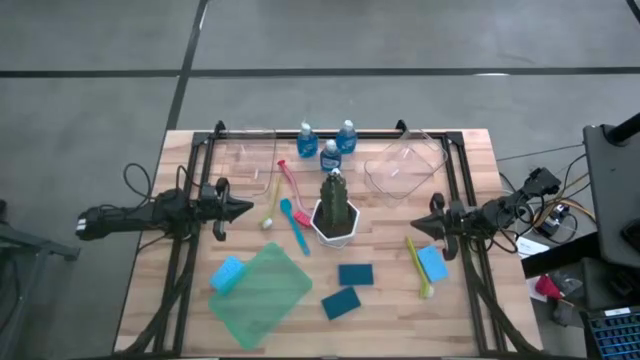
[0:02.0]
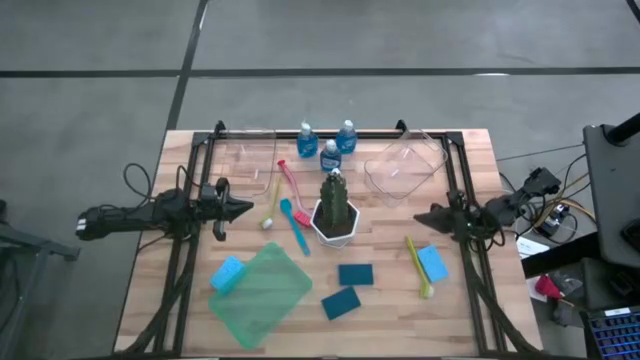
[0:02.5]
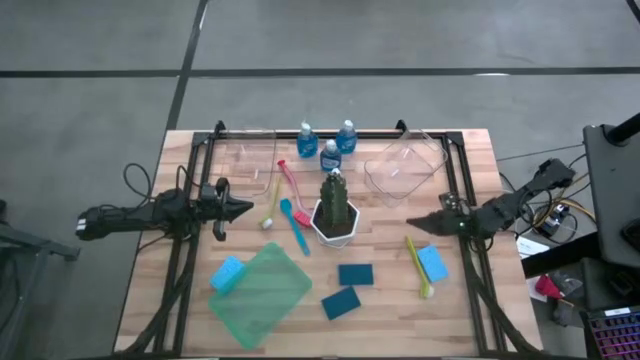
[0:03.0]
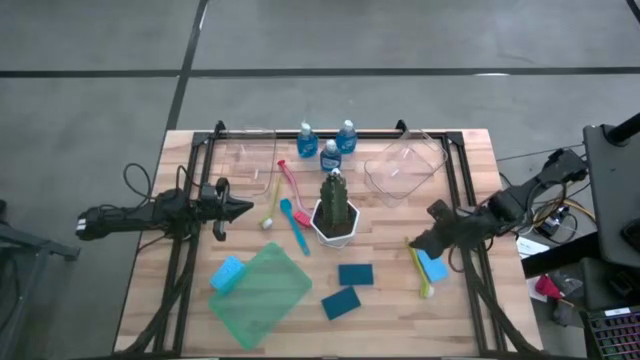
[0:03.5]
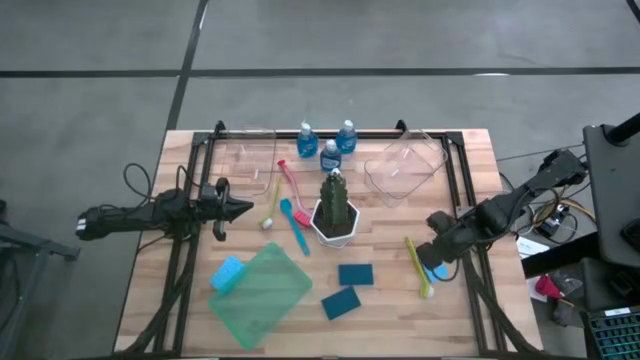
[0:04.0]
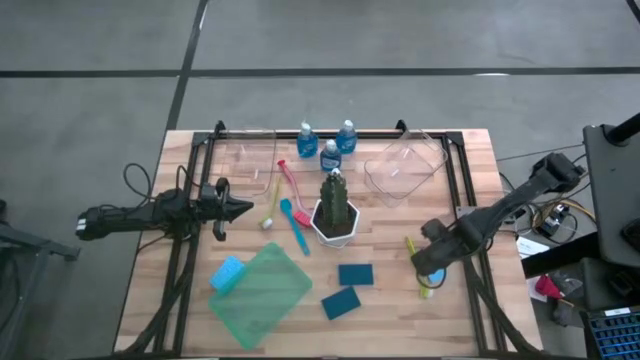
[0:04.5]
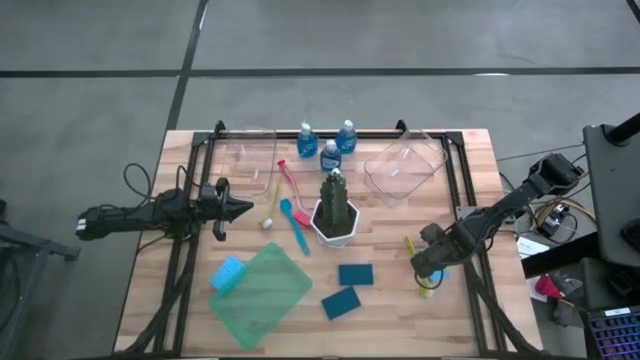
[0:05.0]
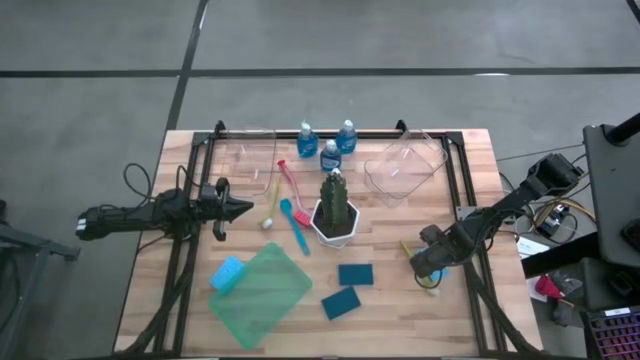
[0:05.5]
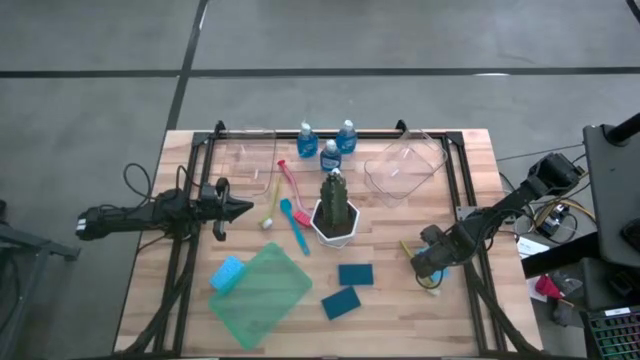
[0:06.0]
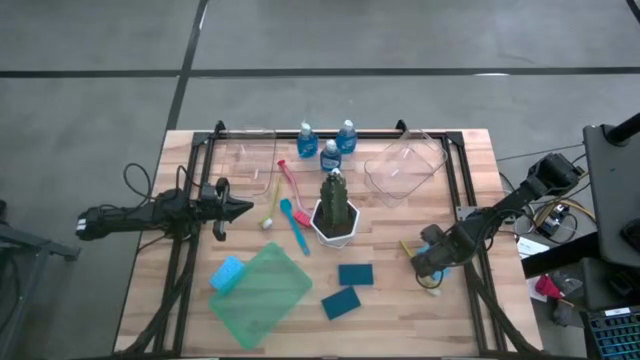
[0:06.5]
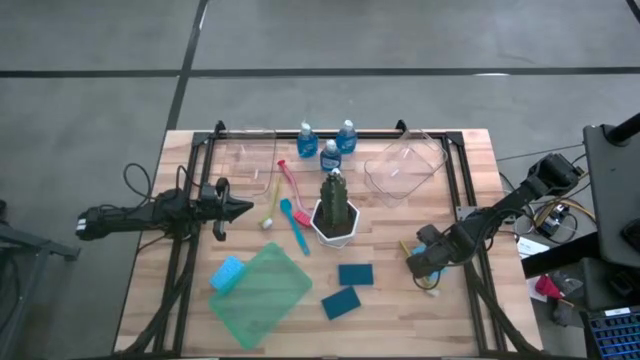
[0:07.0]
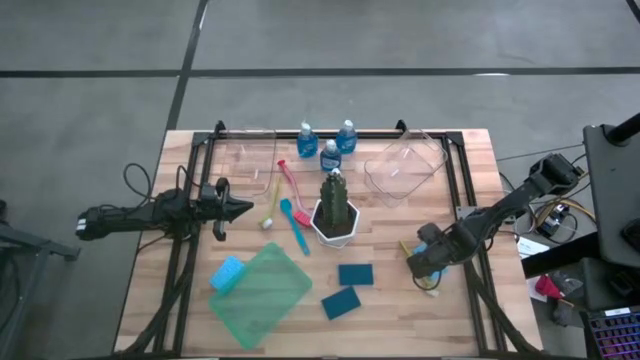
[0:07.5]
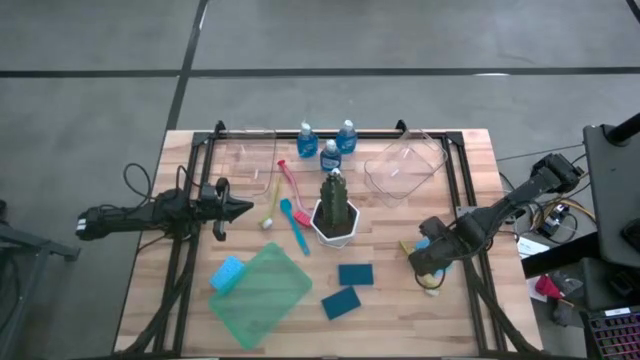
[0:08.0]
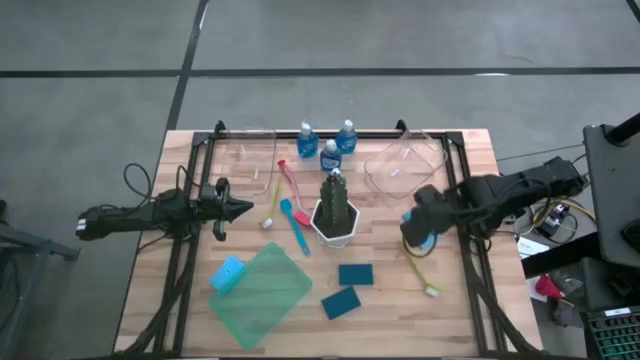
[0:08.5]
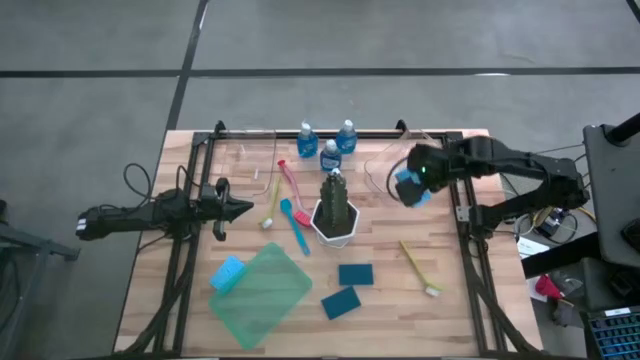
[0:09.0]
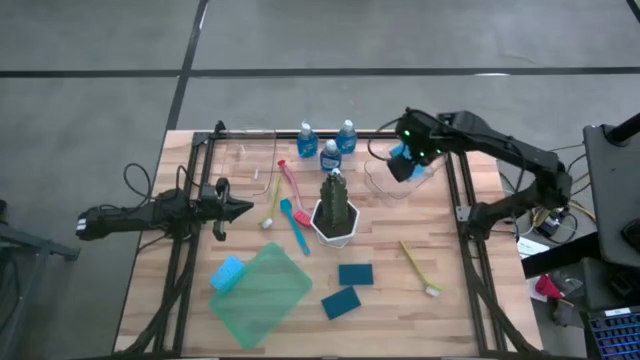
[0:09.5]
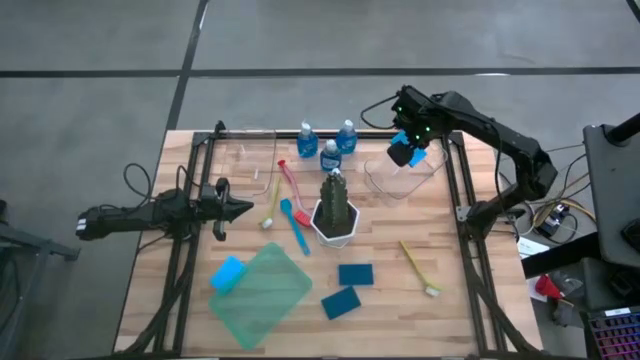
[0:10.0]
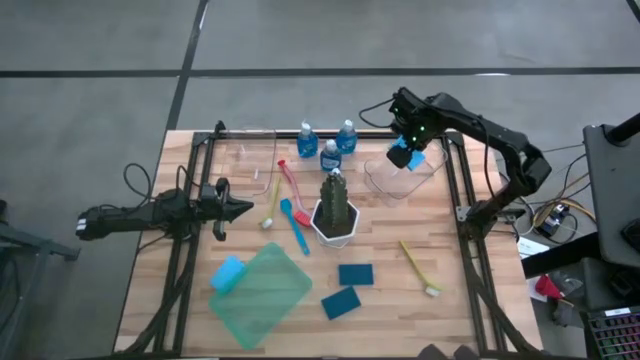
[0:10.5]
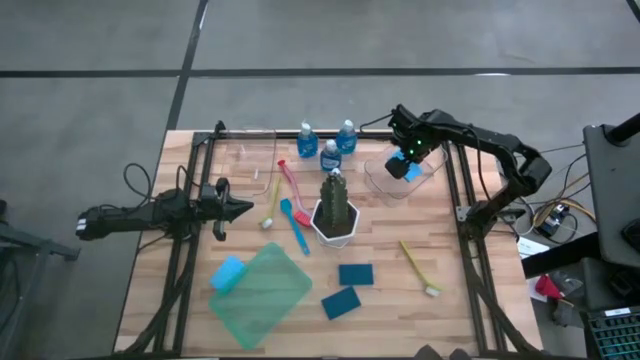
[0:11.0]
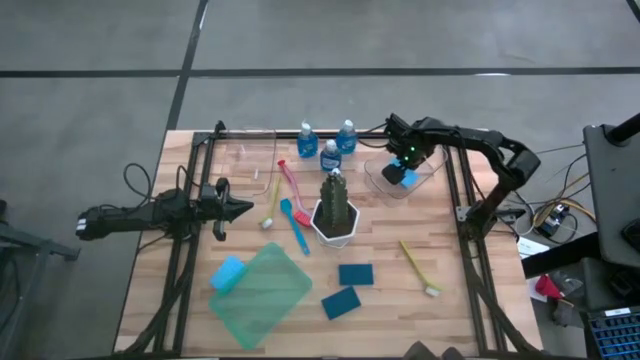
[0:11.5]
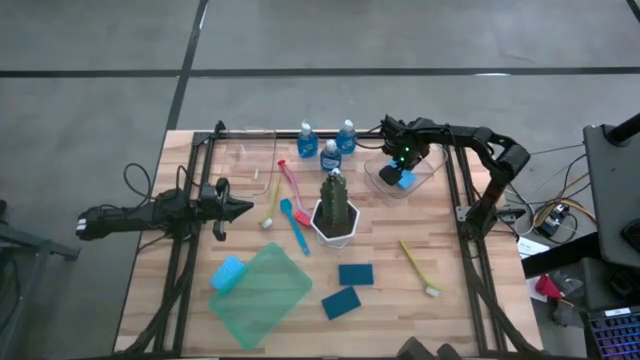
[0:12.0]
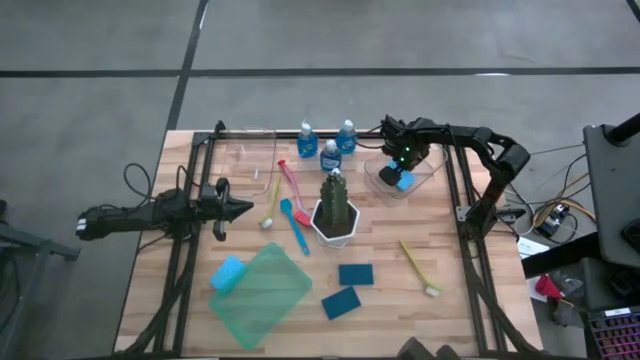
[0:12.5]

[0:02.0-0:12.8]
Task: Pick & Place Kitchen Sink Supplies
Put the blue sponge into the right transparent bin

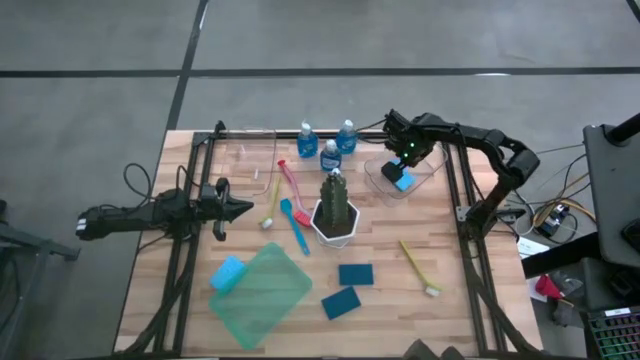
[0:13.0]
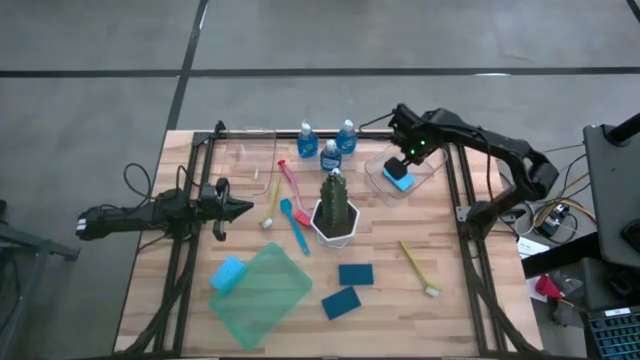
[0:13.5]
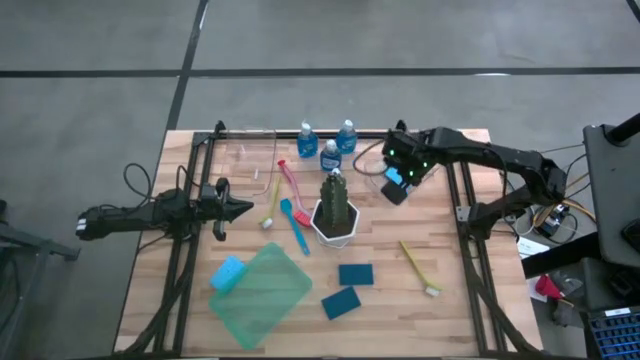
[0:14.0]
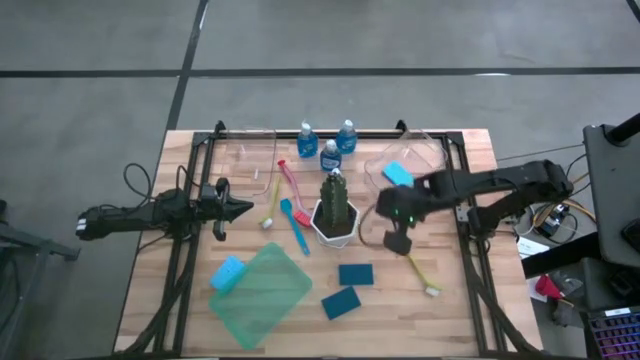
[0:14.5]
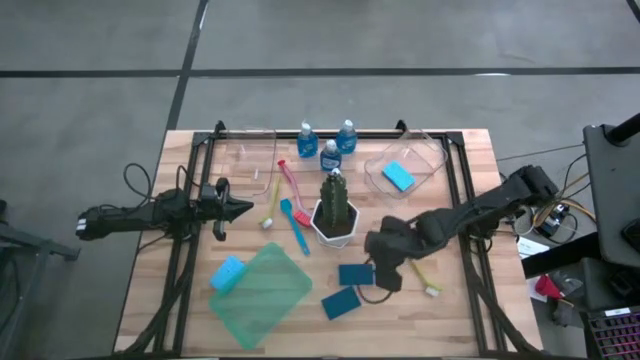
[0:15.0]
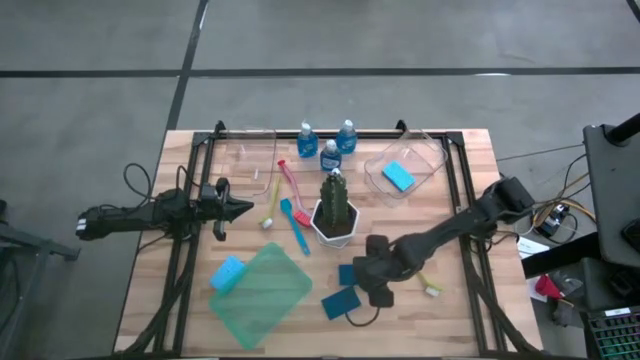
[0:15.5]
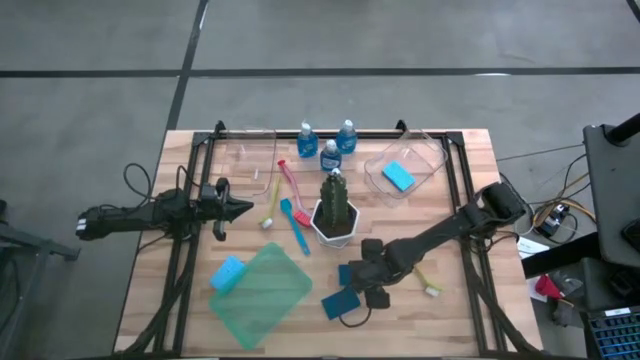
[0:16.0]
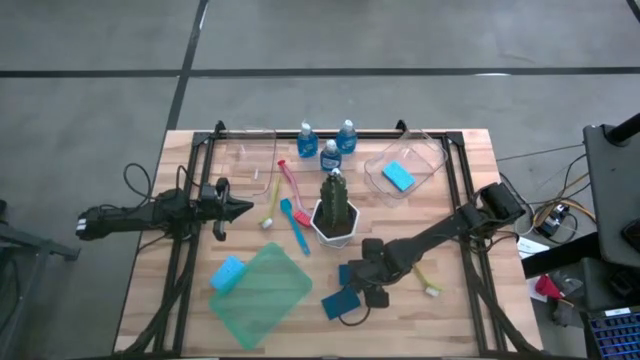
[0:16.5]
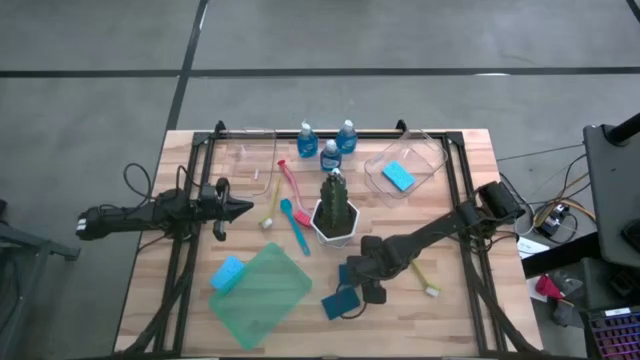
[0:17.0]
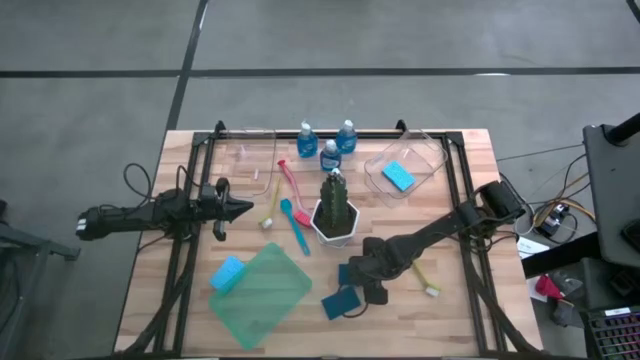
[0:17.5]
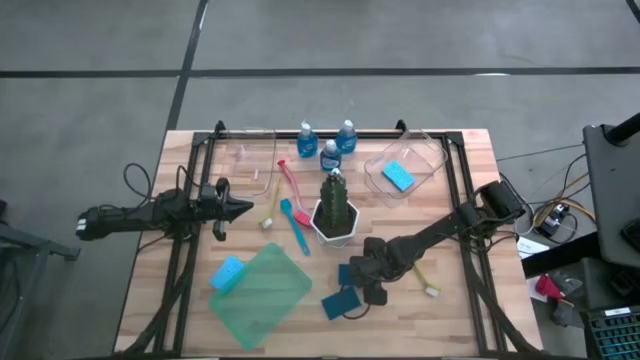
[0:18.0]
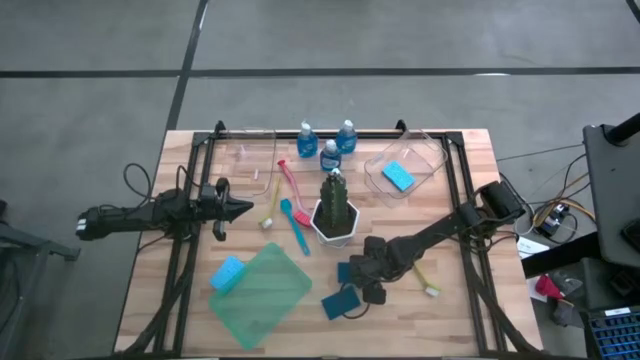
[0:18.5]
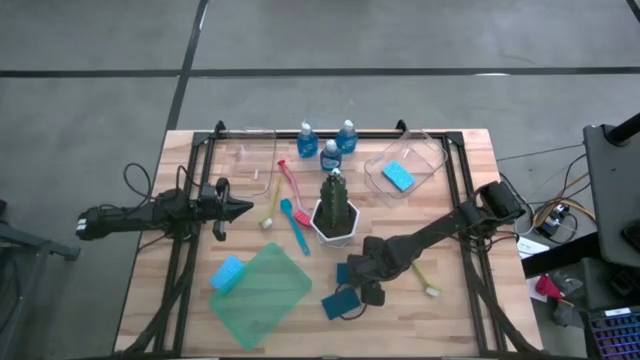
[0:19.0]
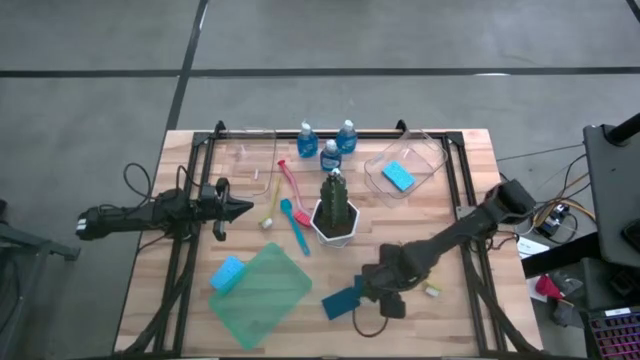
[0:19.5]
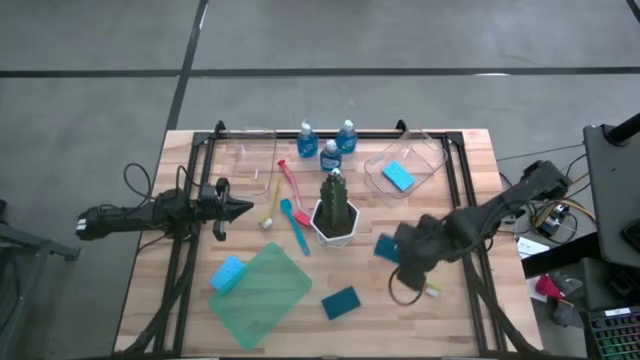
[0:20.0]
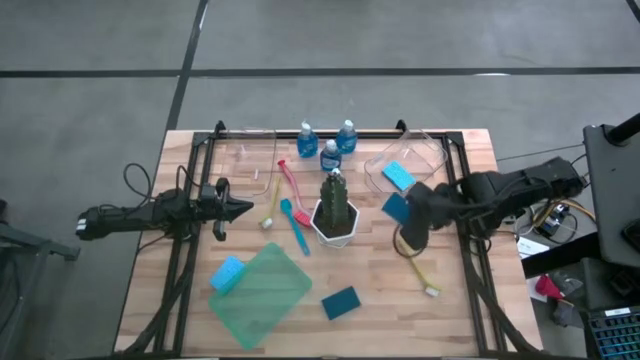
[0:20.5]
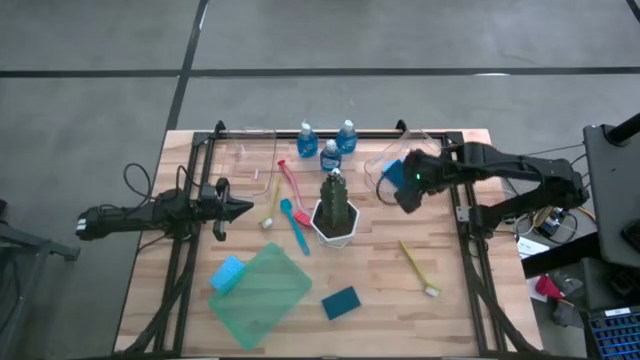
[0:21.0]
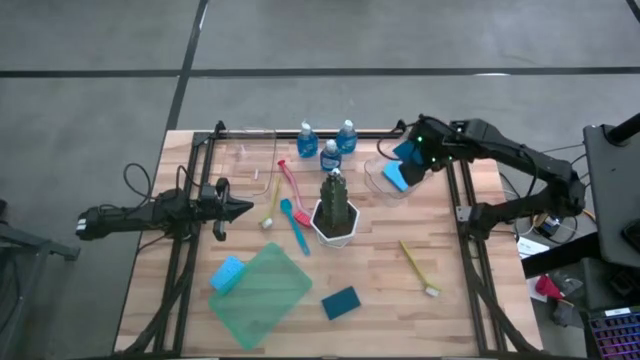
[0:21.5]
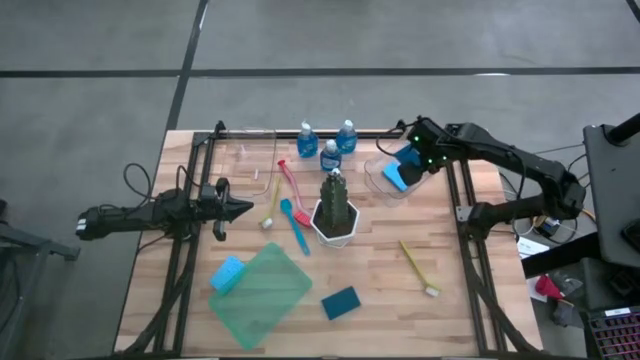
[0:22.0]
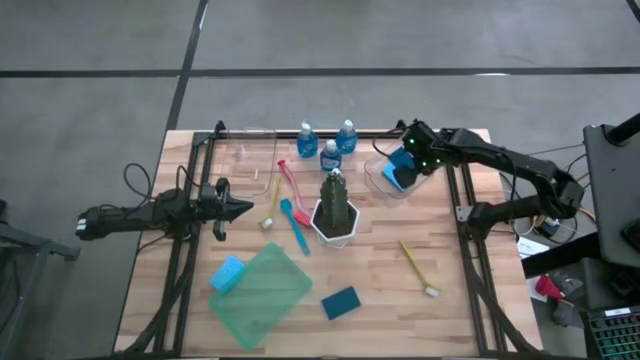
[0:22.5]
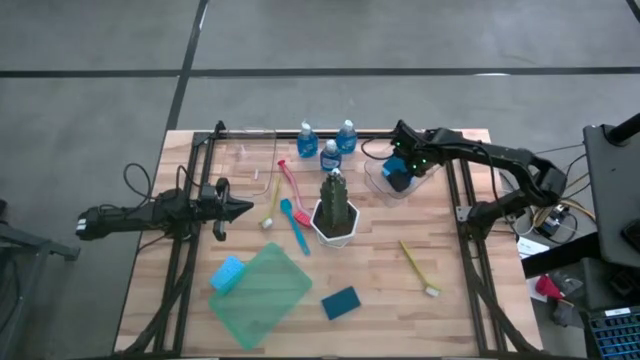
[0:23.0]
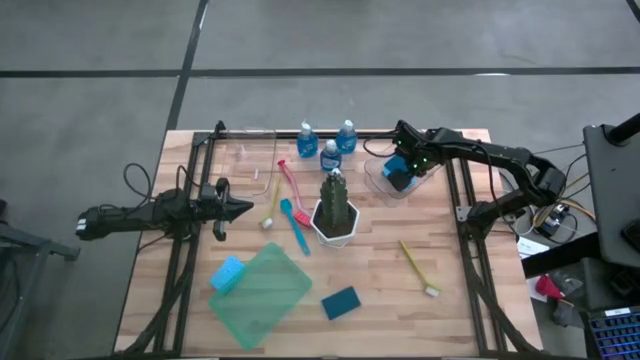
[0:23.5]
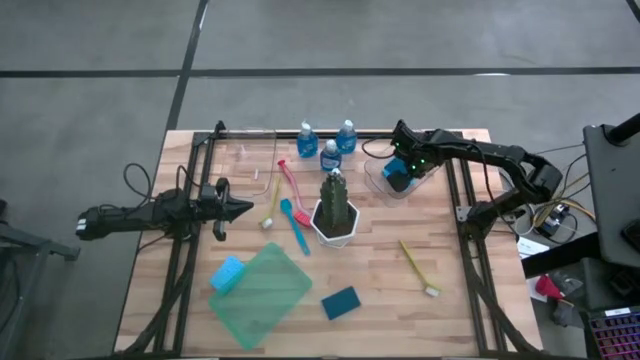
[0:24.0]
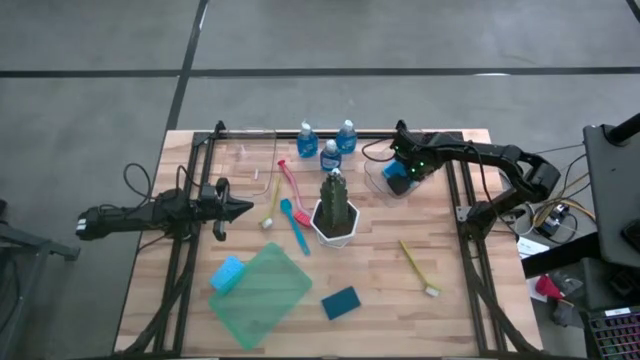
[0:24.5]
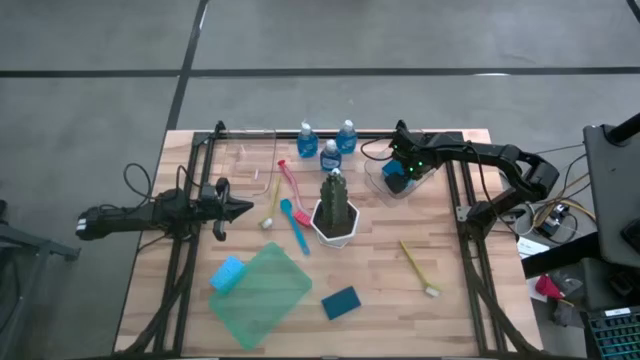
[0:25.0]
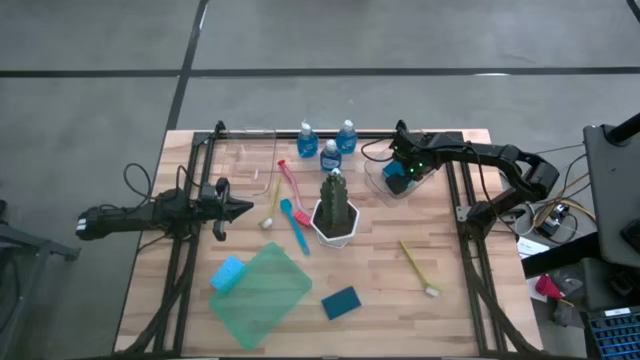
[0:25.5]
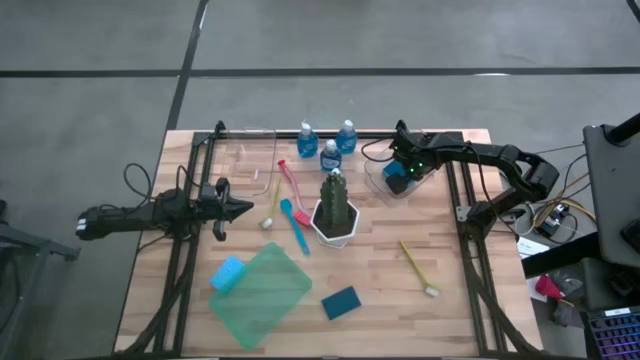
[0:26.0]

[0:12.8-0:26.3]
Put the blue sponge into the right transparent bin
